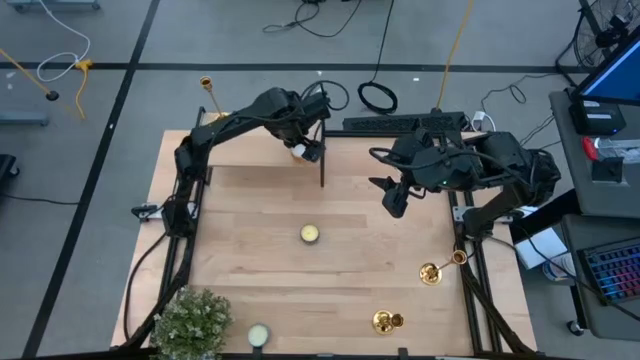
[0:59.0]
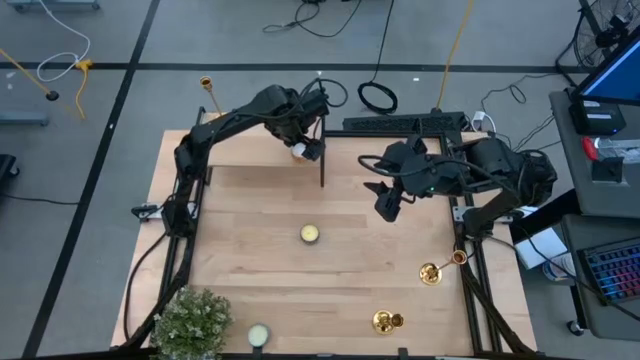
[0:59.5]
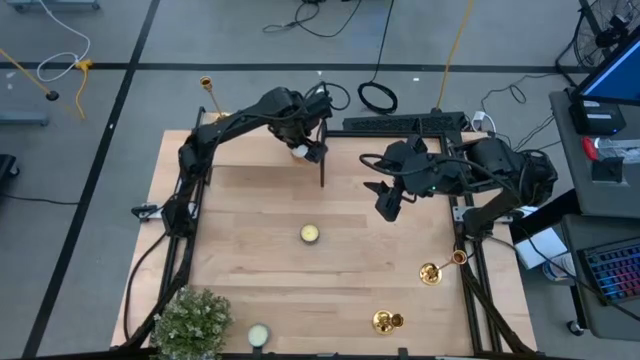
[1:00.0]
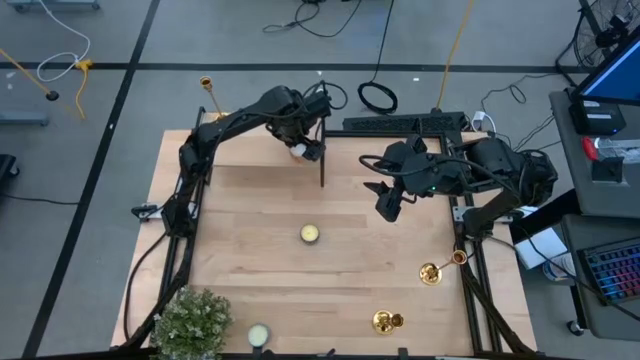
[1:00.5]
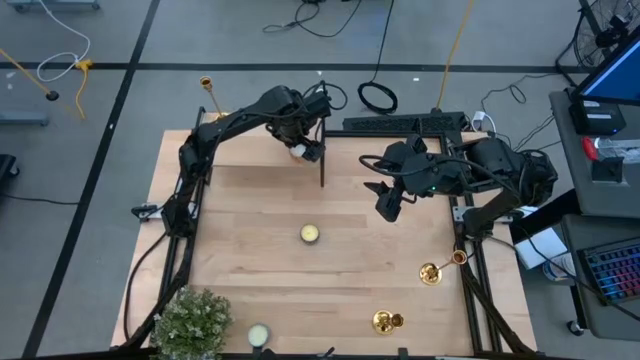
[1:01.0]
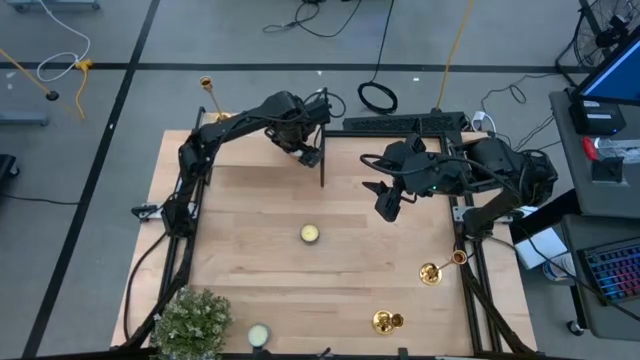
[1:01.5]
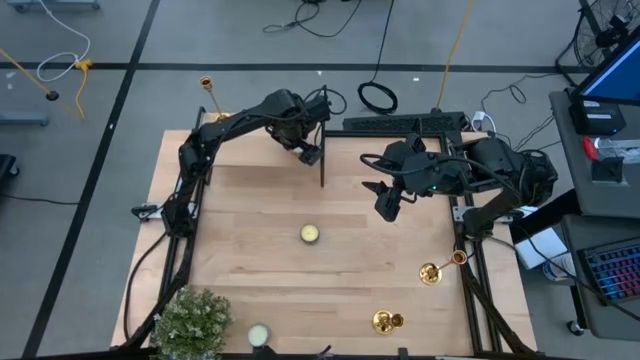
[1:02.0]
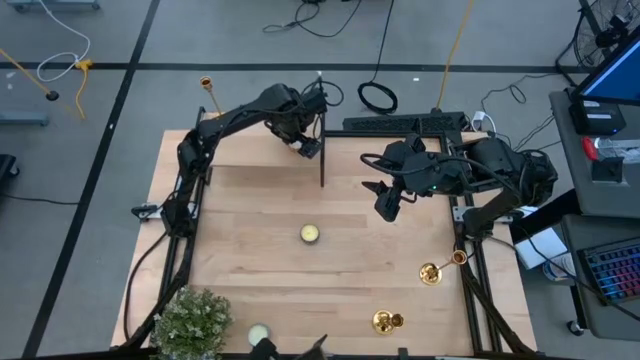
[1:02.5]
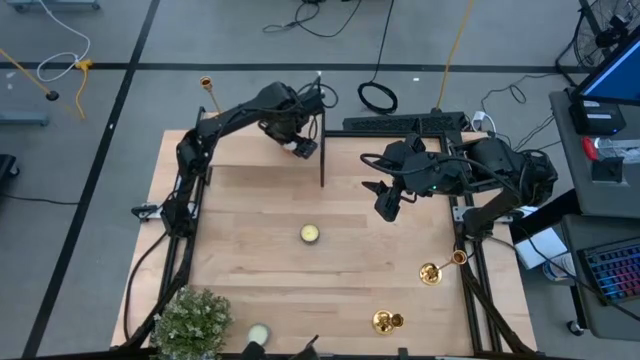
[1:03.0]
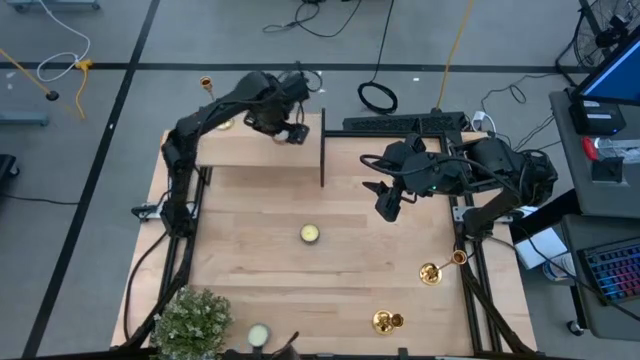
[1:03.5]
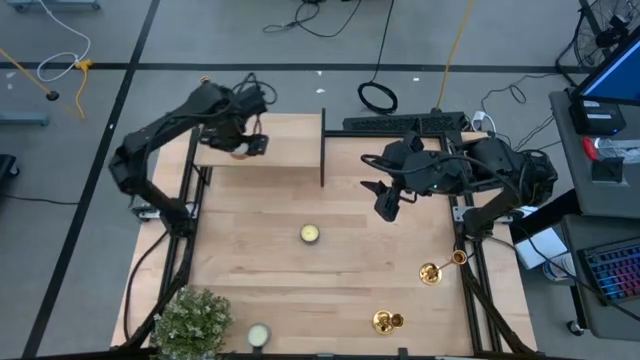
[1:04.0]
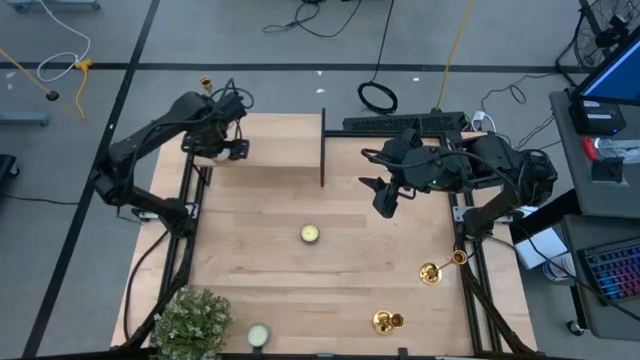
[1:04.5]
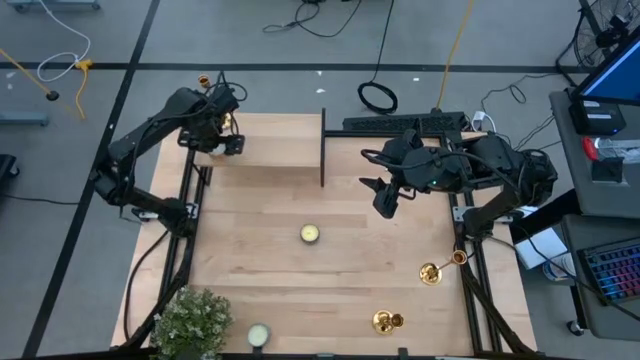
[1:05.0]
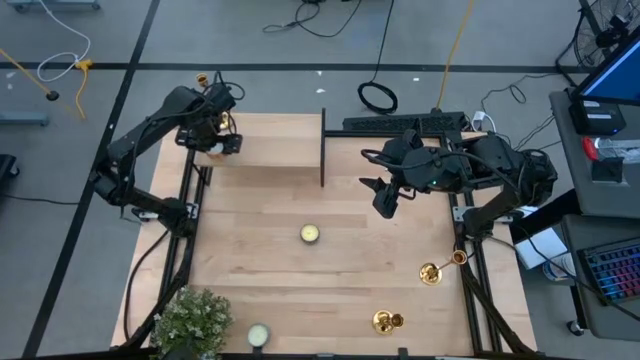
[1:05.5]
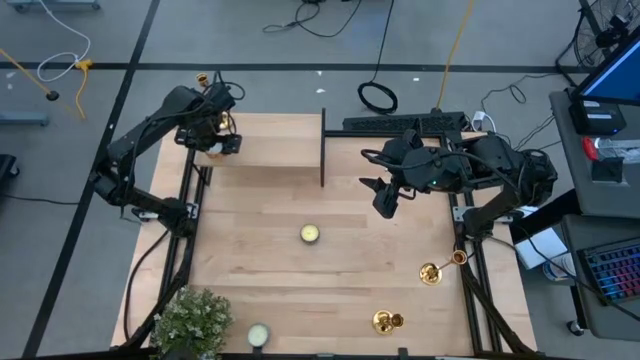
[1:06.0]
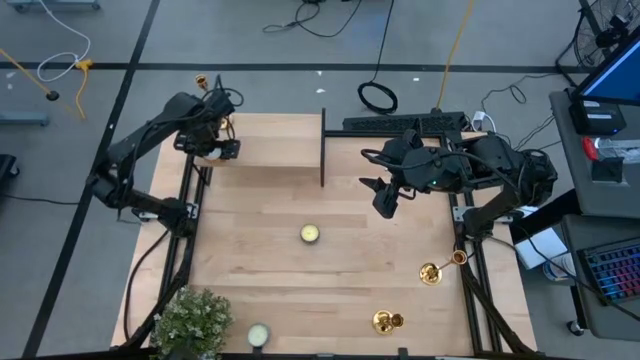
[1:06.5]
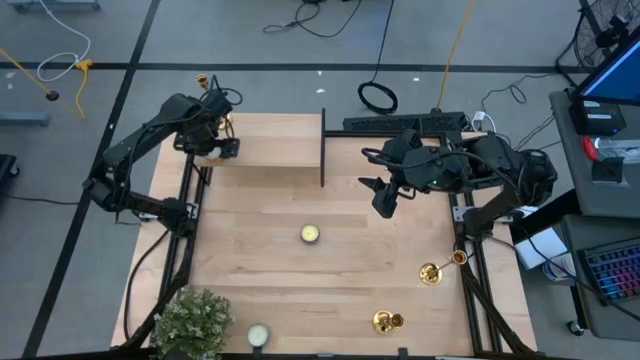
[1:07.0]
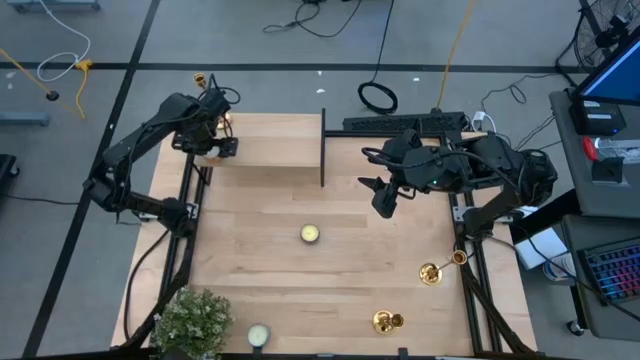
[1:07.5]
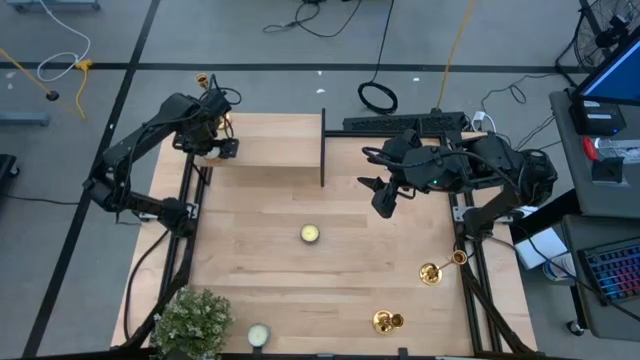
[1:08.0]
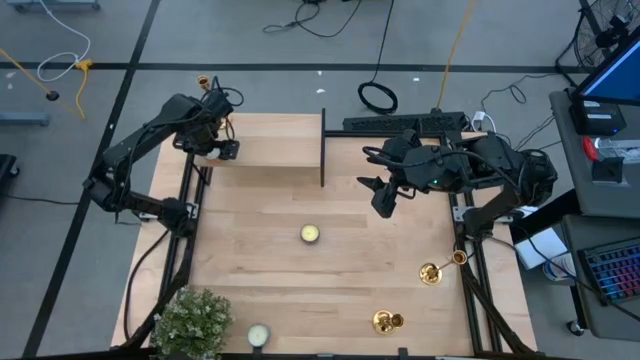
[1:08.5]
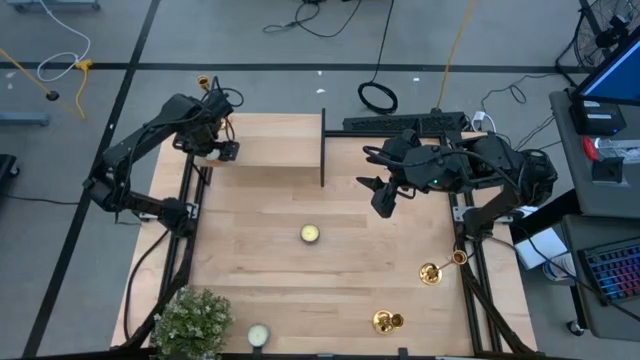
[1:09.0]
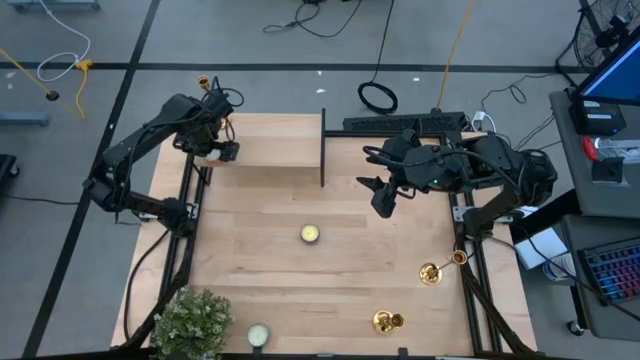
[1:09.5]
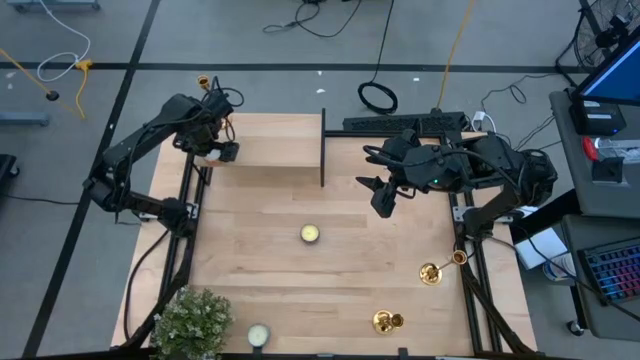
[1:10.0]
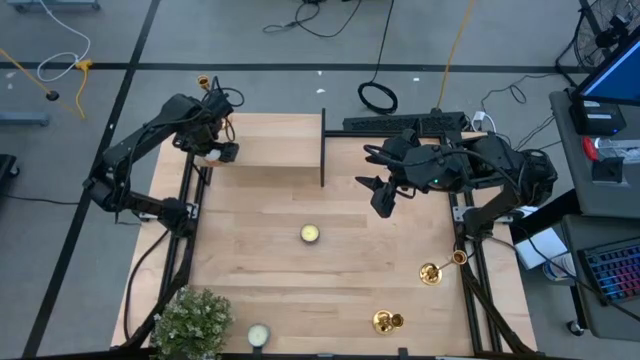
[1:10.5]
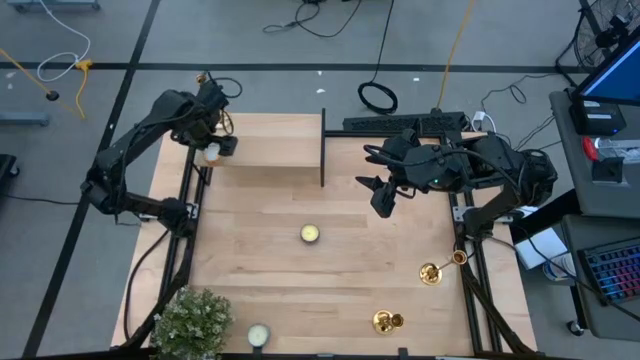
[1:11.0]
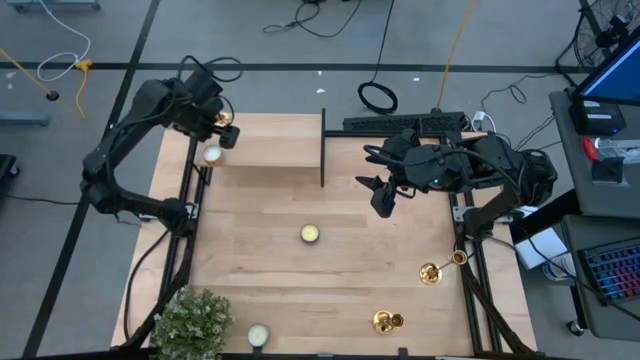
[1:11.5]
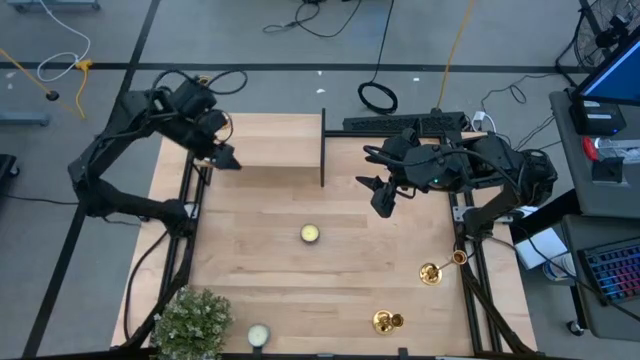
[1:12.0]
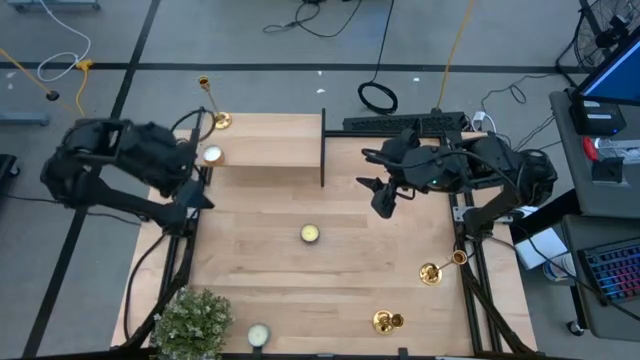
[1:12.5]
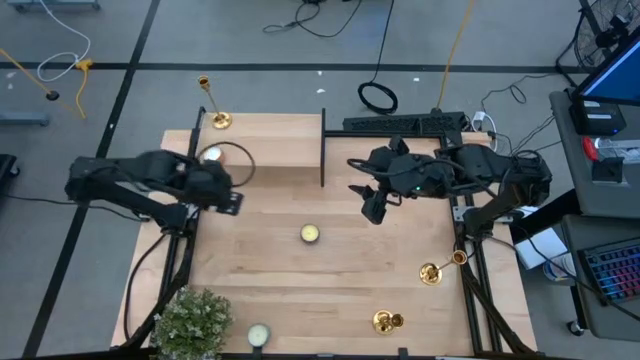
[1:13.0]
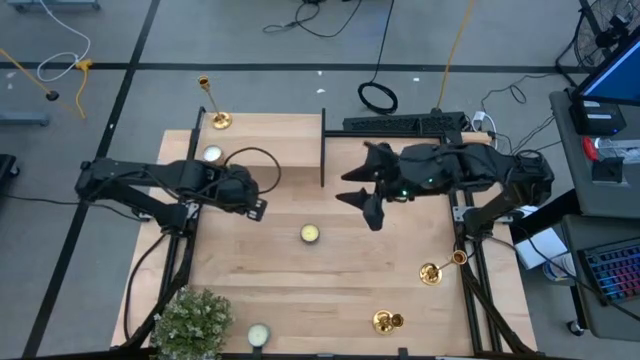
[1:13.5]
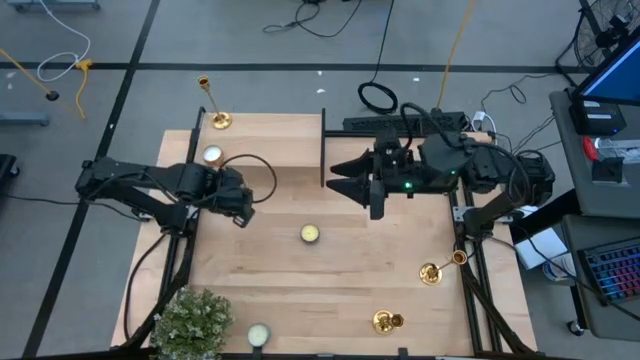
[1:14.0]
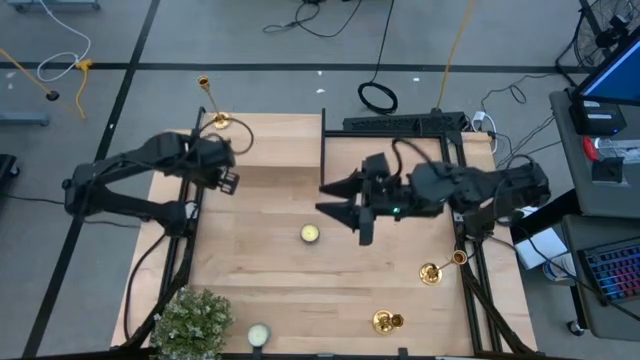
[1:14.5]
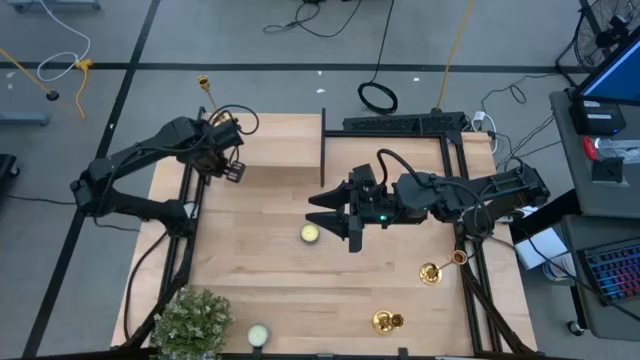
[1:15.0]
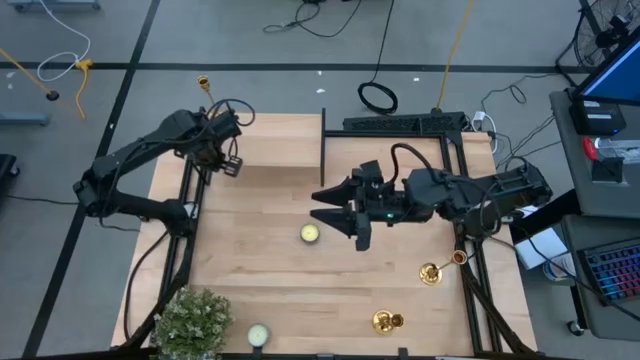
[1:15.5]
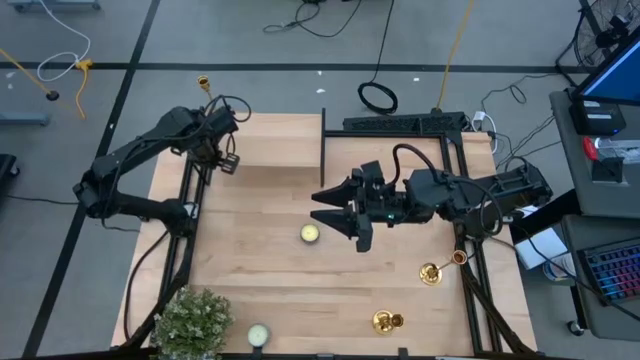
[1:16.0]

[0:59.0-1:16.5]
Task: Pick & Place candle stick holders
Put the orange scented candle on the shelf
